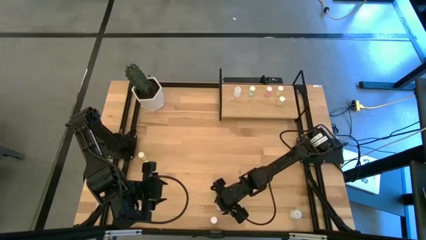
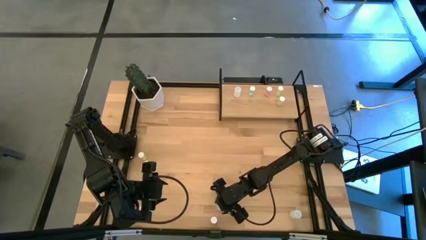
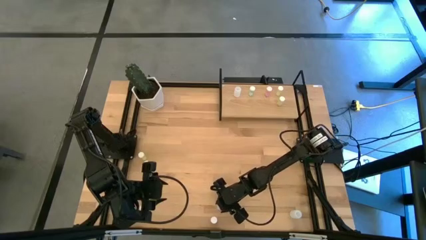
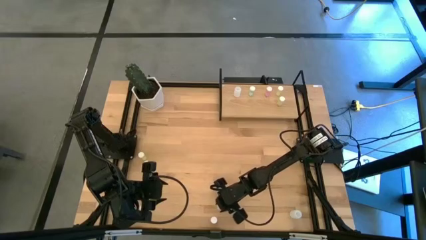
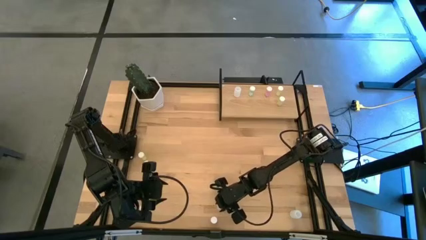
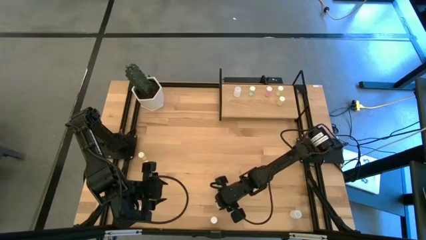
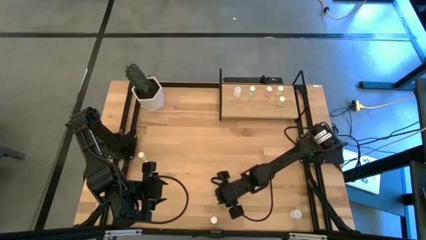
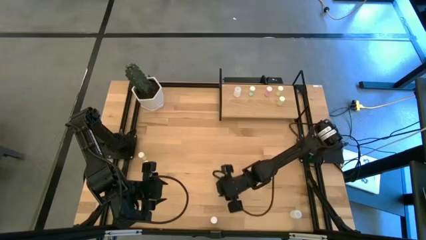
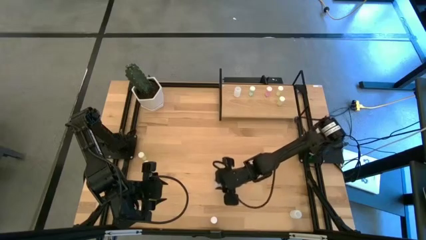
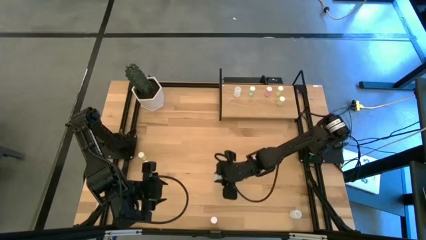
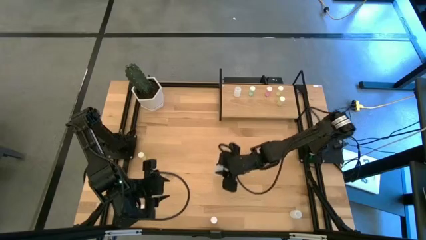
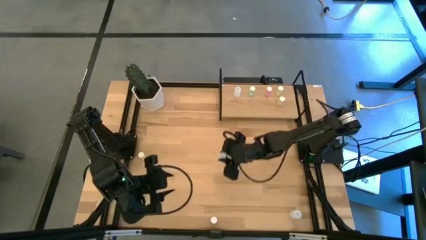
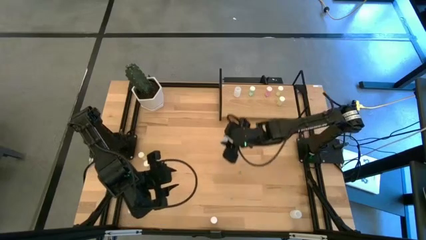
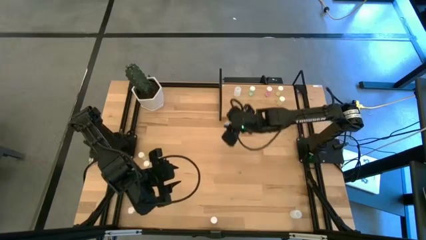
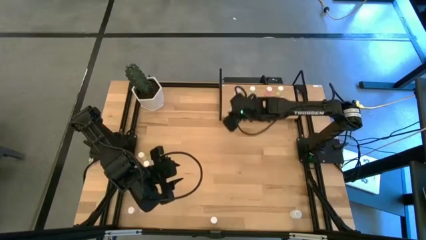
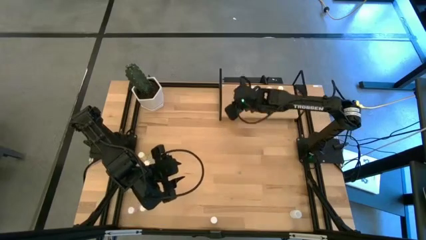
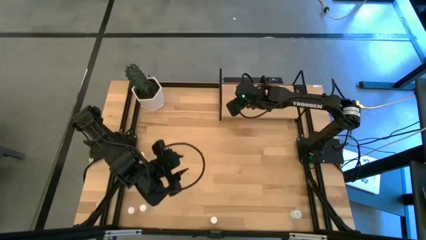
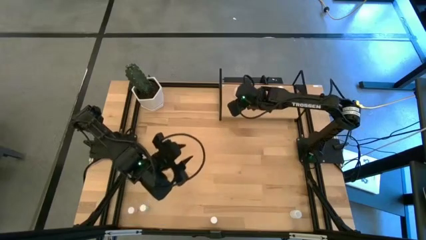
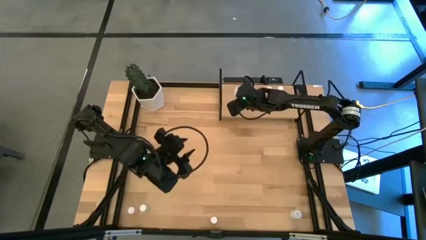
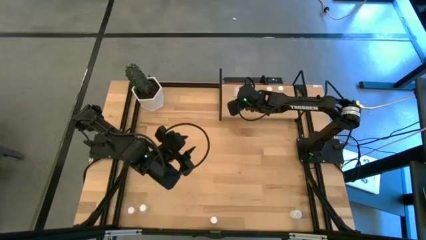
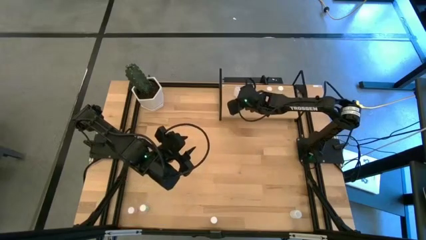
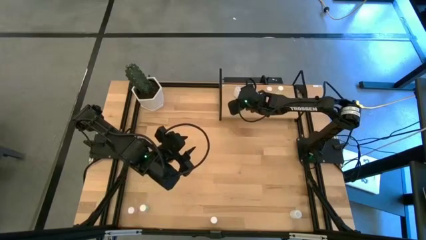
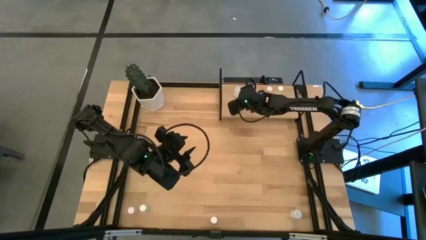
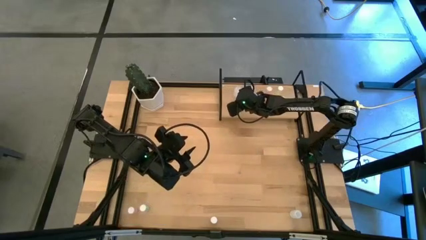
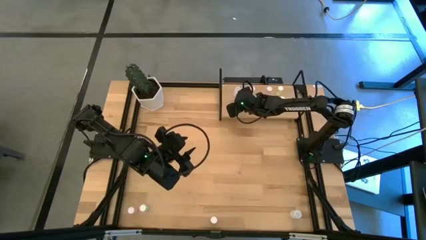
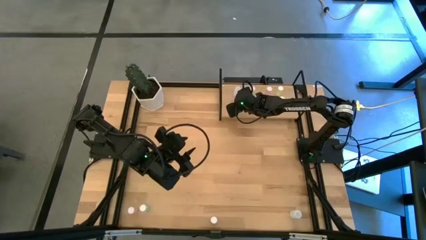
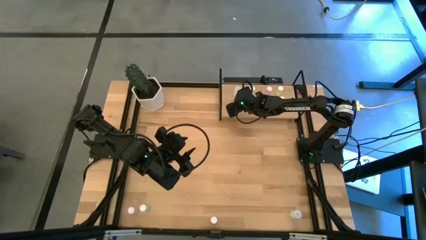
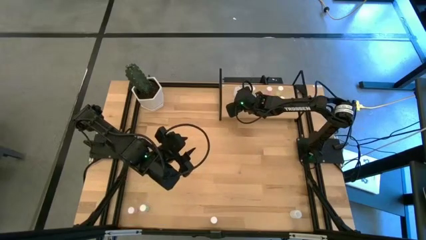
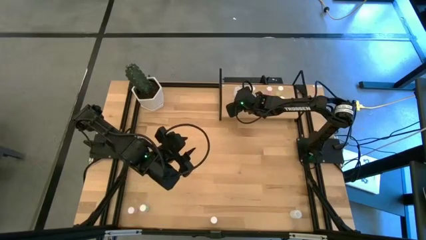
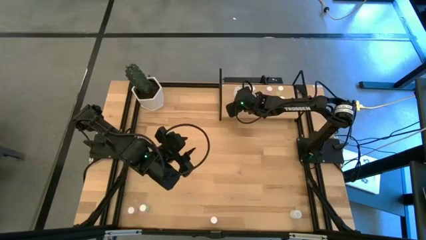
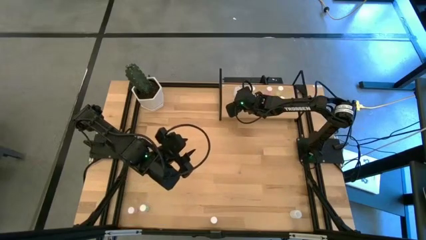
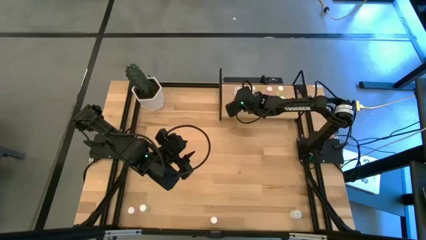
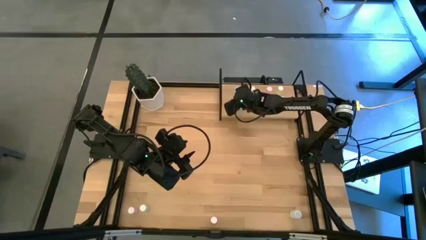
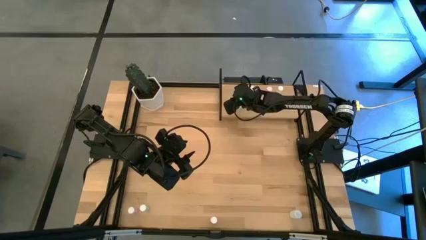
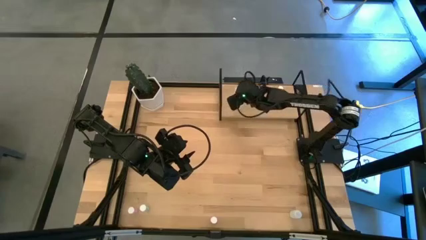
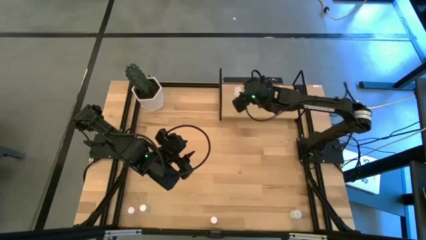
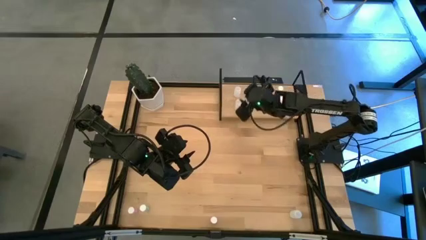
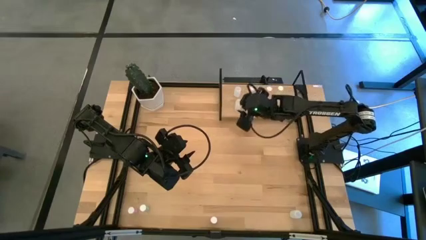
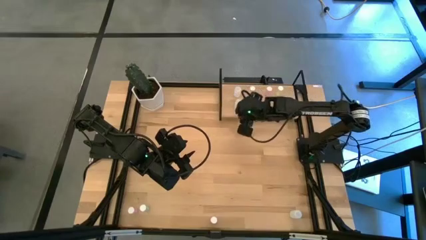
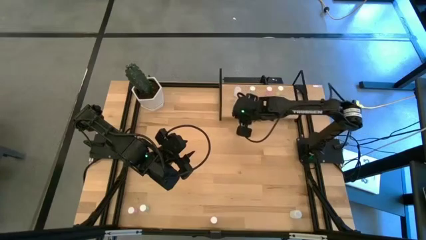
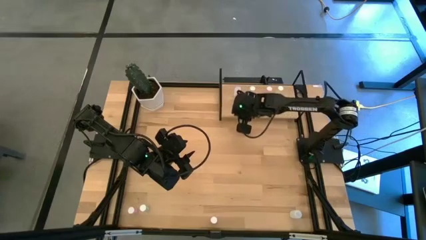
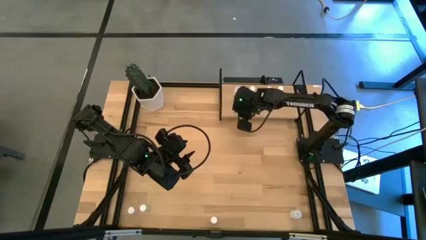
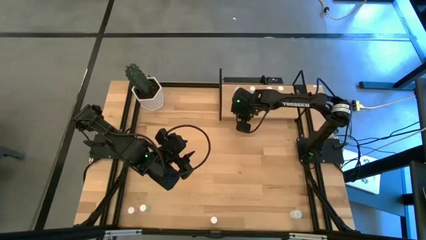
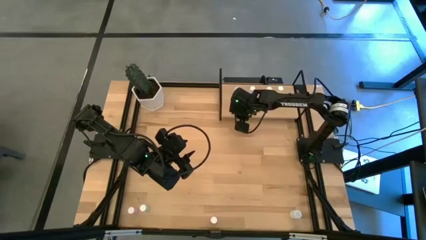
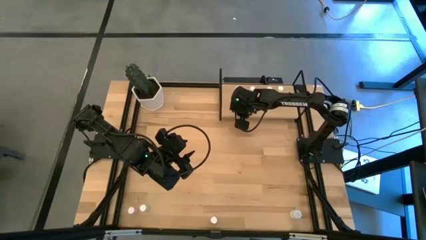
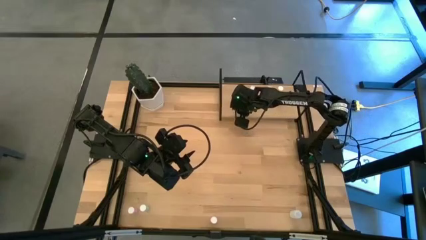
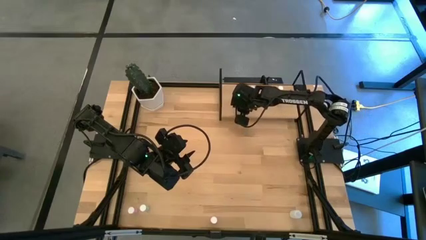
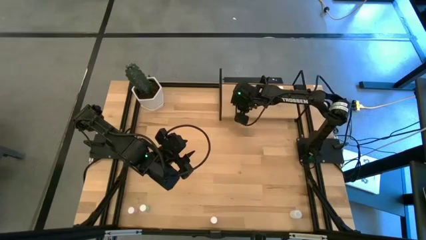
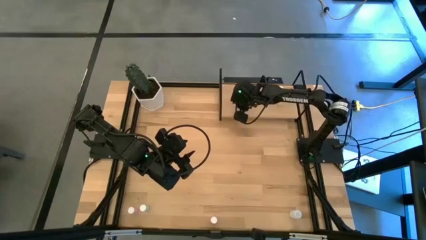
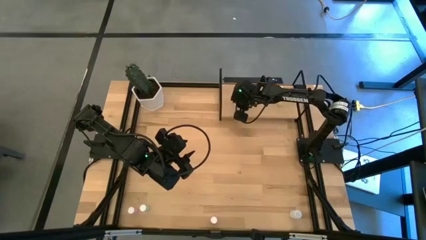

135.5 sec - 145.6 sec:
Task: Pick and place medicine bottles onto shelf by color
Put the left transparent pill bottle on the shelf aligned with the other transparent pill bottle

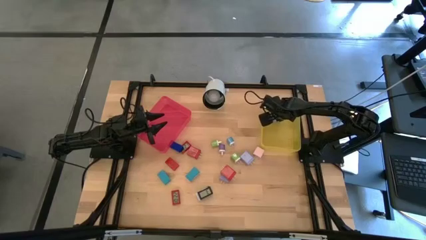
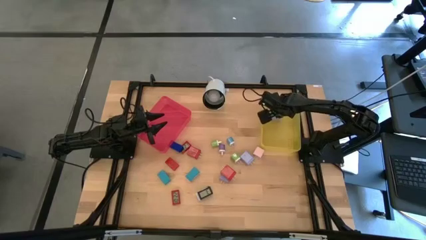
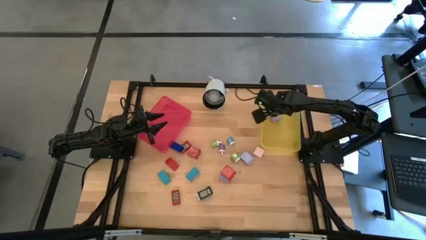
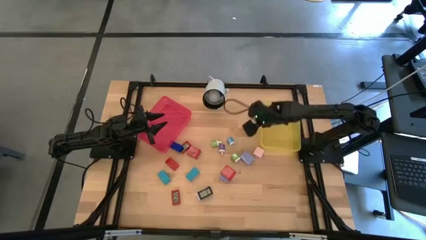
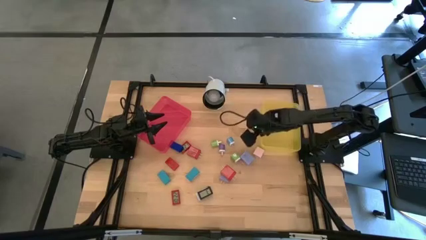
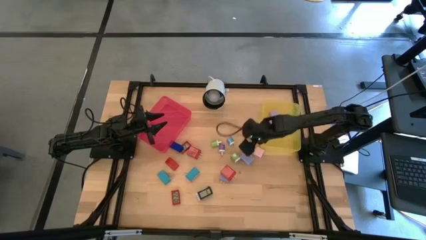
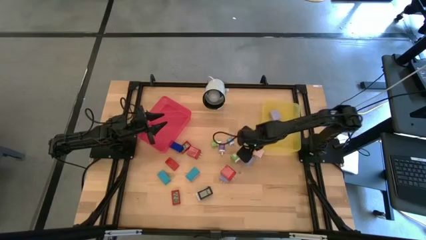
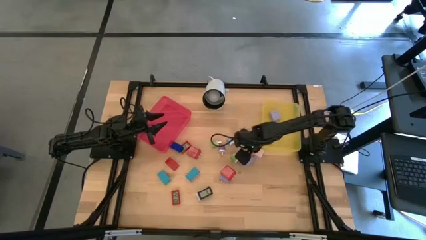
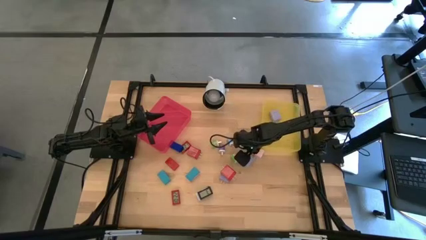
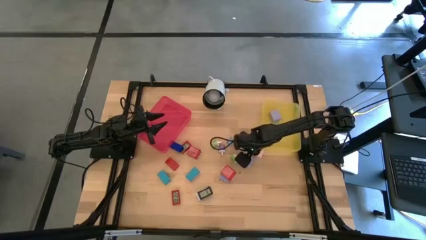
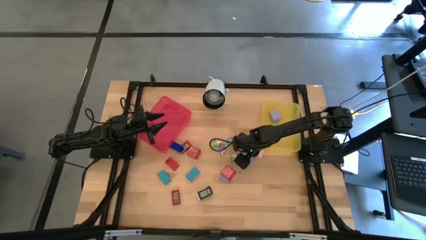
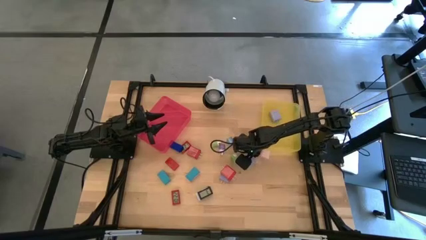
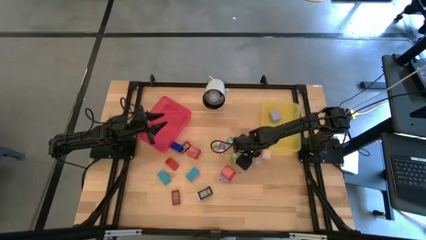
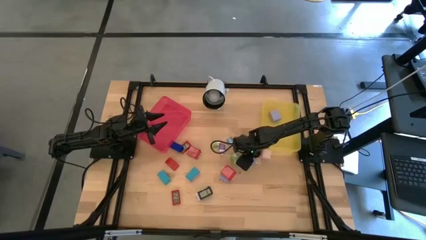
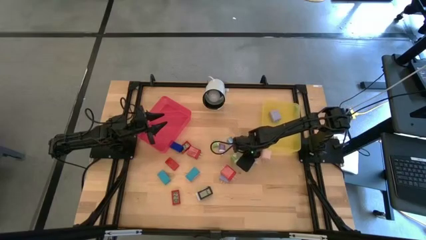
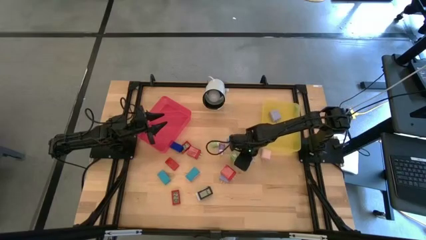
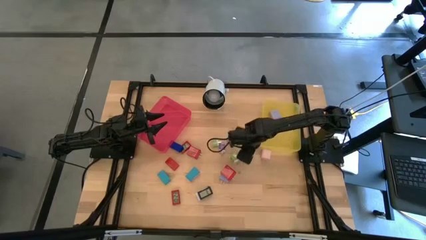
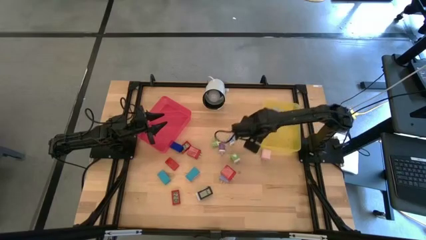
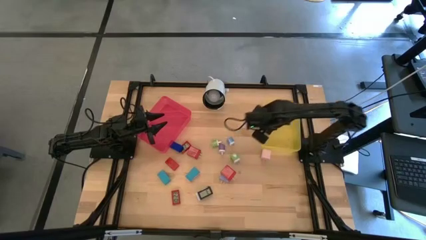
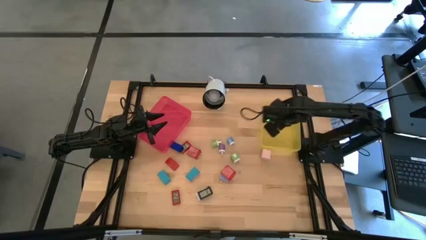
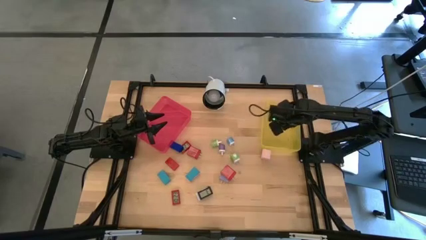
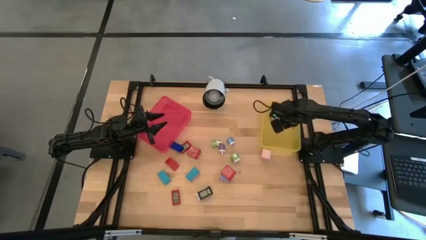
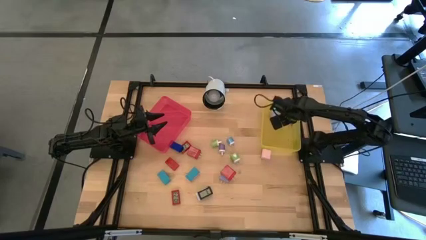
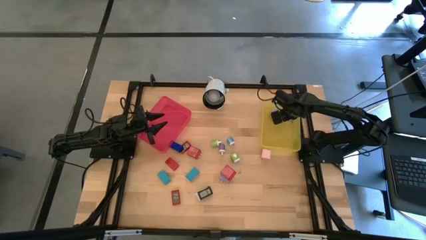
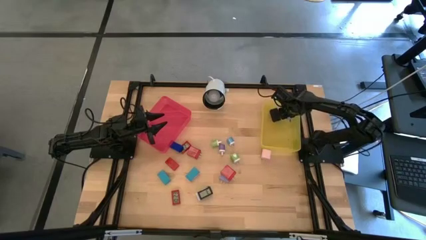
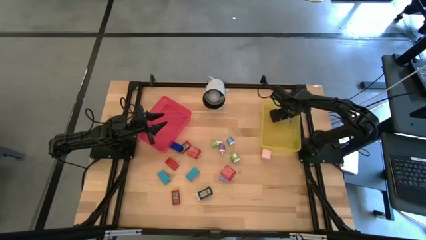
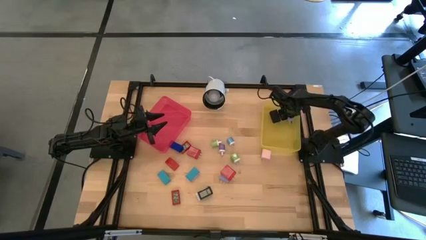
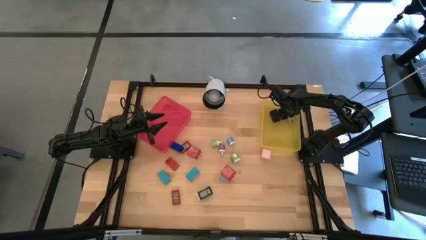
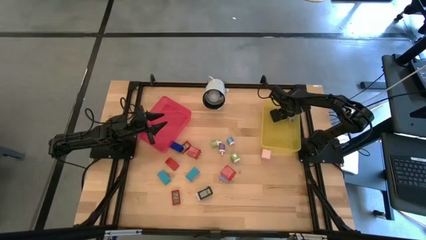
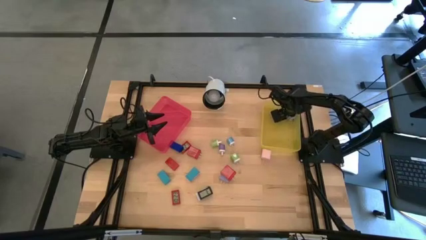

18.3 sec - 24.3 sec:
Task: Pick & Place Office items
Put the blue charger adapter into the yellow bin
